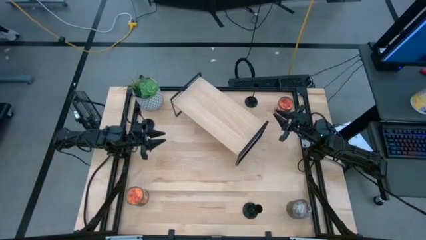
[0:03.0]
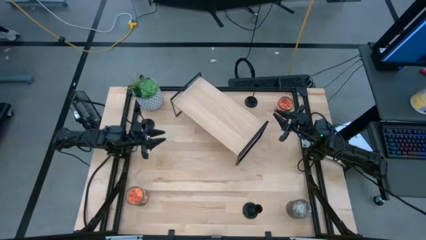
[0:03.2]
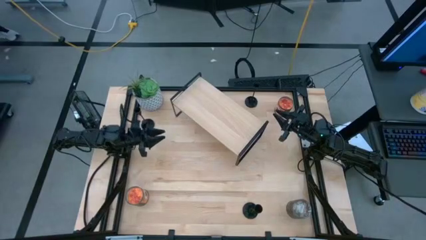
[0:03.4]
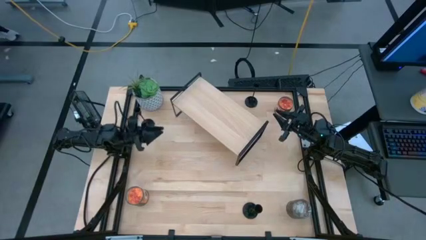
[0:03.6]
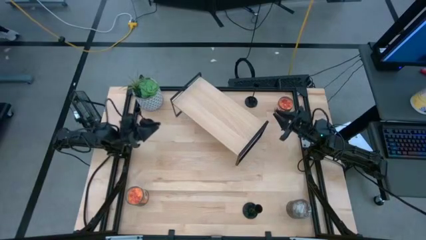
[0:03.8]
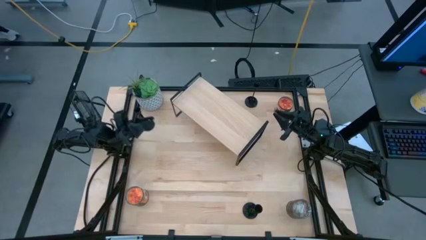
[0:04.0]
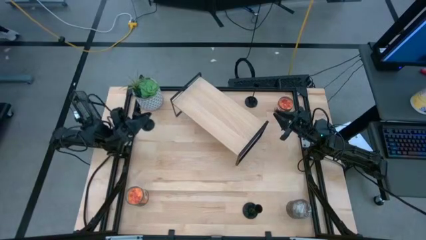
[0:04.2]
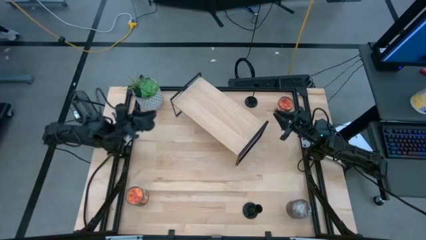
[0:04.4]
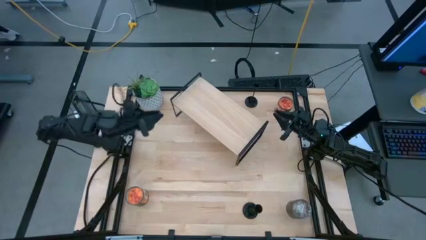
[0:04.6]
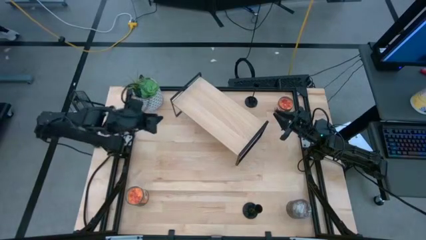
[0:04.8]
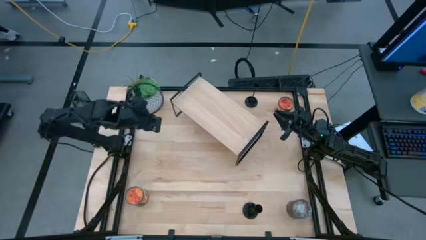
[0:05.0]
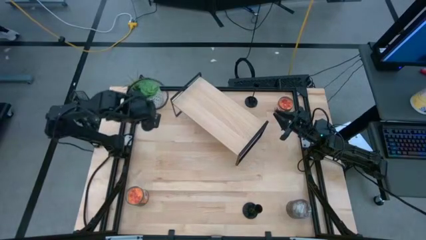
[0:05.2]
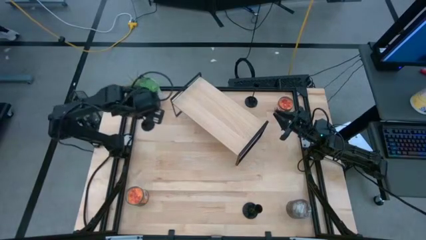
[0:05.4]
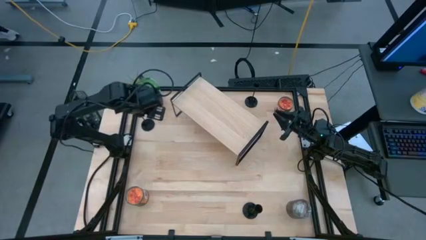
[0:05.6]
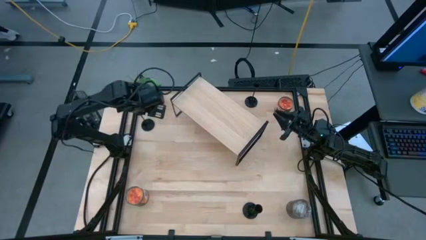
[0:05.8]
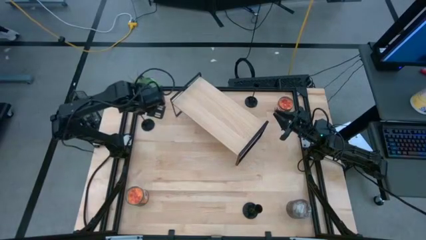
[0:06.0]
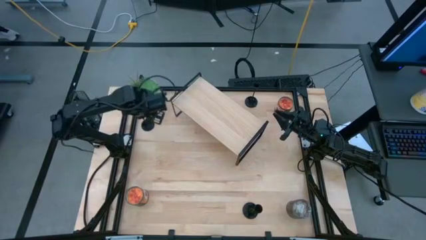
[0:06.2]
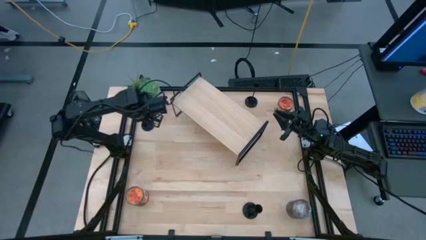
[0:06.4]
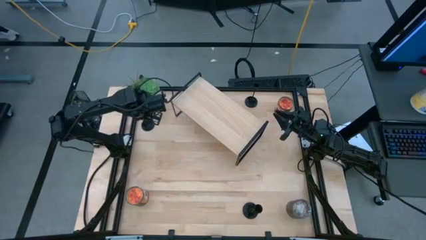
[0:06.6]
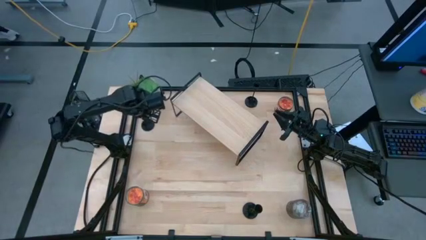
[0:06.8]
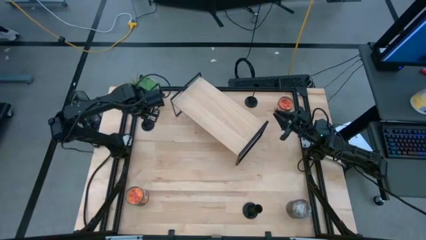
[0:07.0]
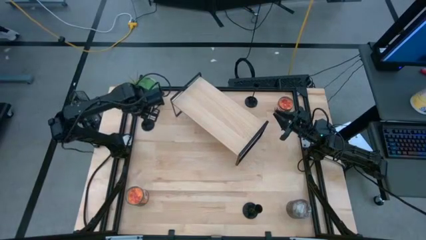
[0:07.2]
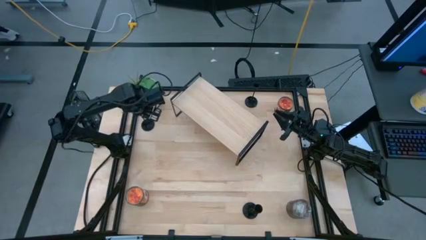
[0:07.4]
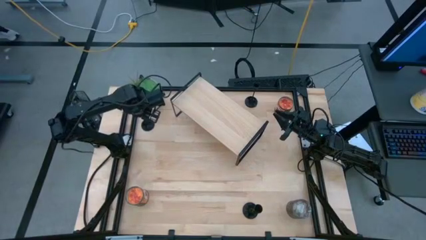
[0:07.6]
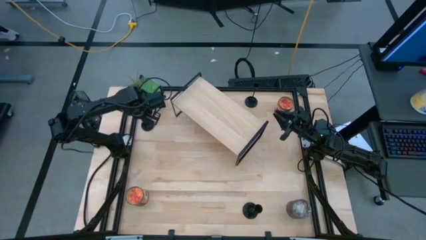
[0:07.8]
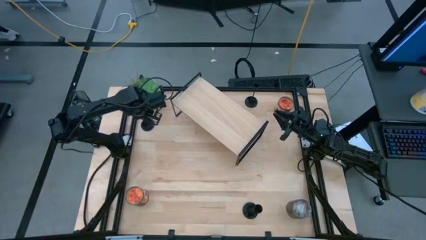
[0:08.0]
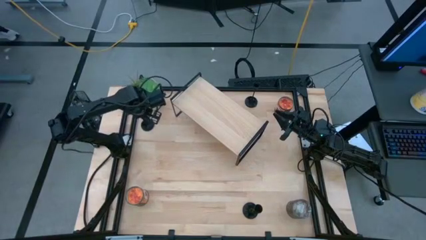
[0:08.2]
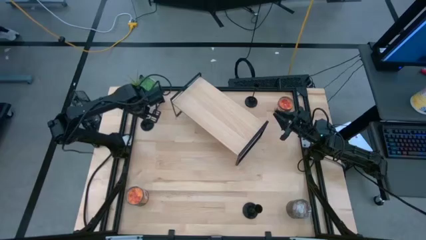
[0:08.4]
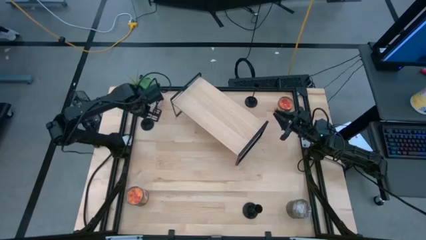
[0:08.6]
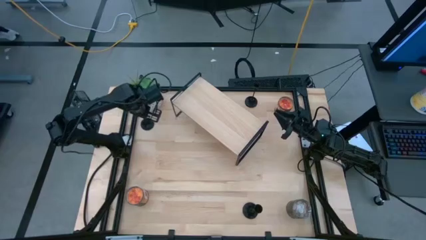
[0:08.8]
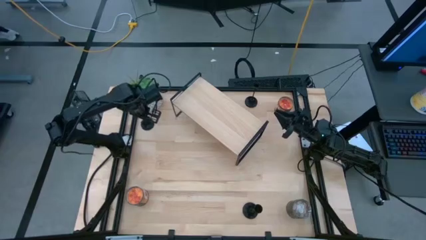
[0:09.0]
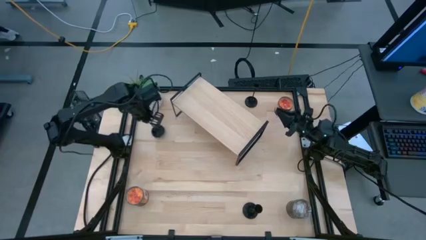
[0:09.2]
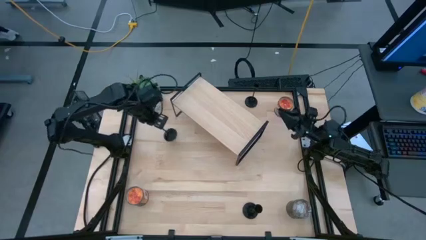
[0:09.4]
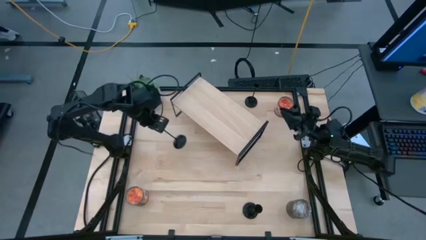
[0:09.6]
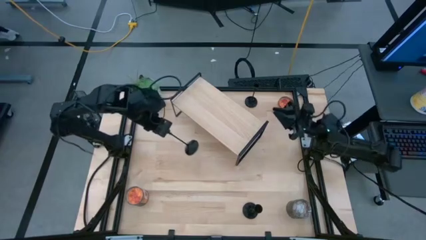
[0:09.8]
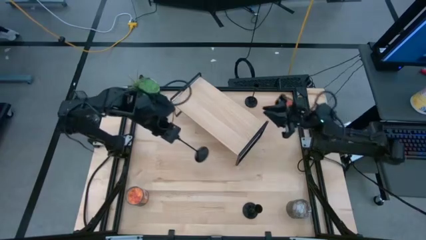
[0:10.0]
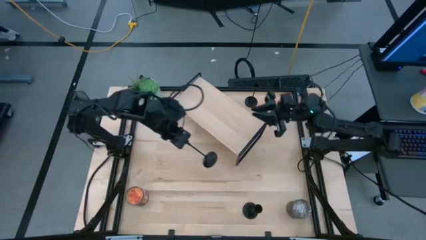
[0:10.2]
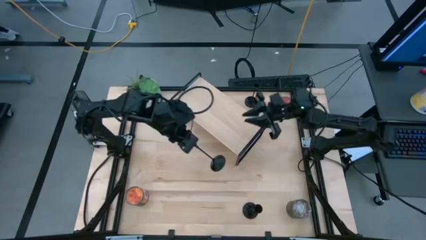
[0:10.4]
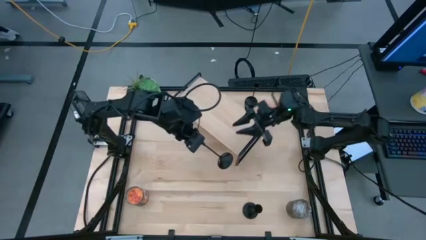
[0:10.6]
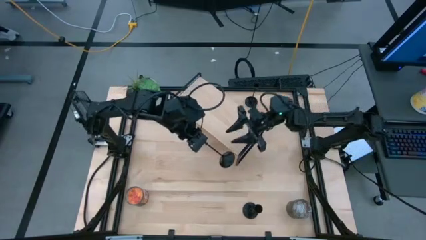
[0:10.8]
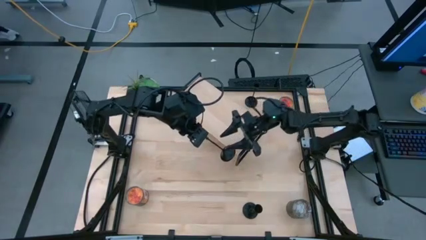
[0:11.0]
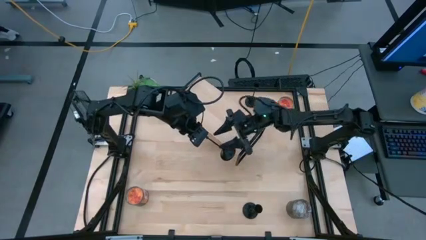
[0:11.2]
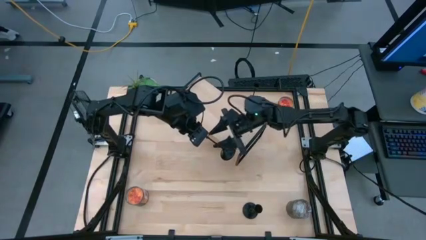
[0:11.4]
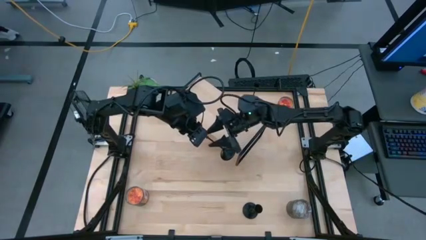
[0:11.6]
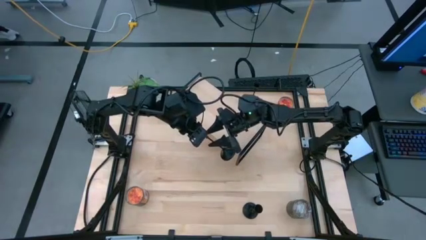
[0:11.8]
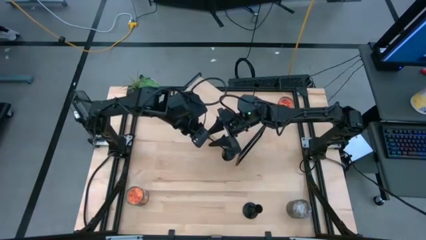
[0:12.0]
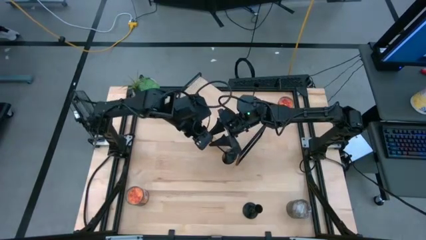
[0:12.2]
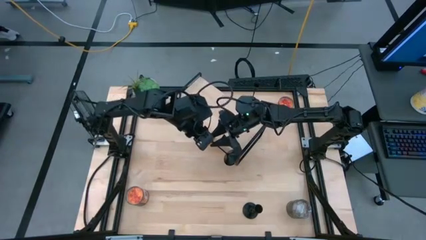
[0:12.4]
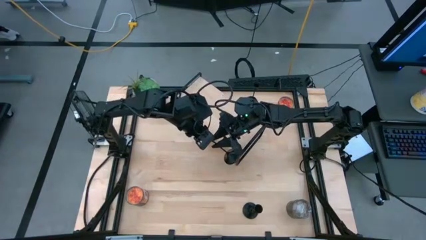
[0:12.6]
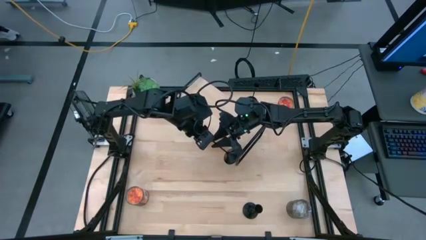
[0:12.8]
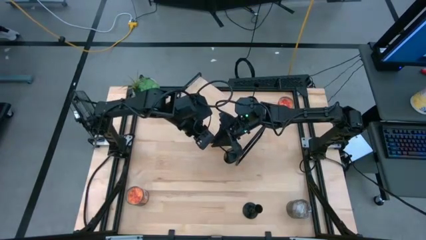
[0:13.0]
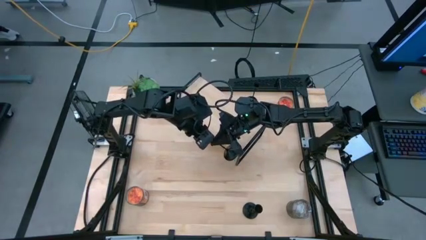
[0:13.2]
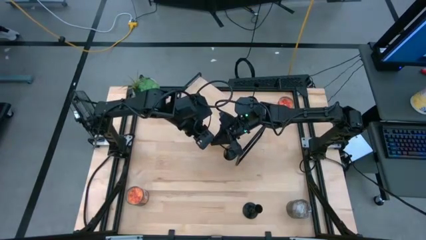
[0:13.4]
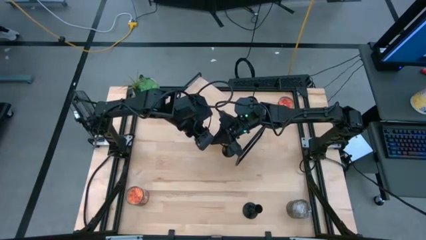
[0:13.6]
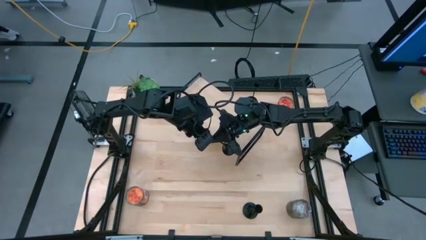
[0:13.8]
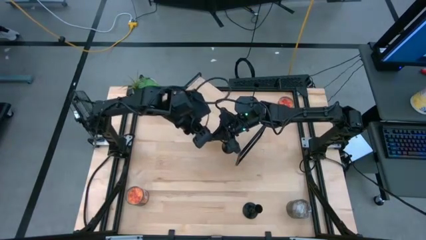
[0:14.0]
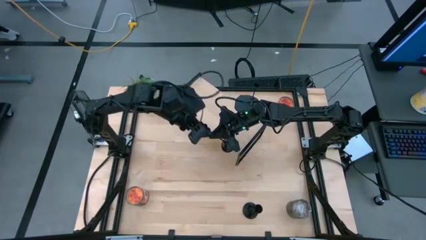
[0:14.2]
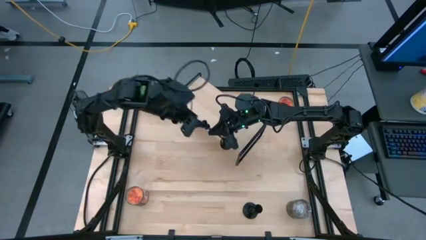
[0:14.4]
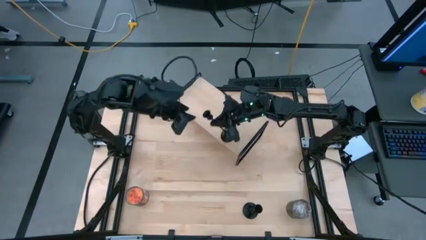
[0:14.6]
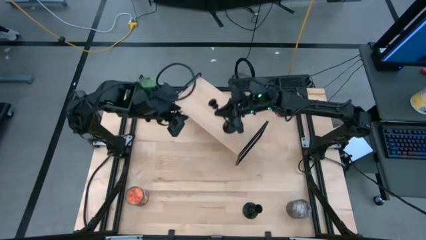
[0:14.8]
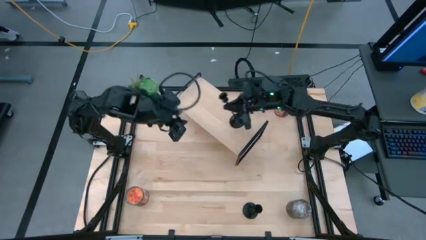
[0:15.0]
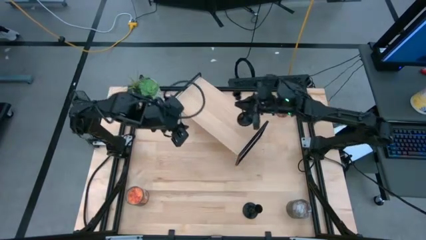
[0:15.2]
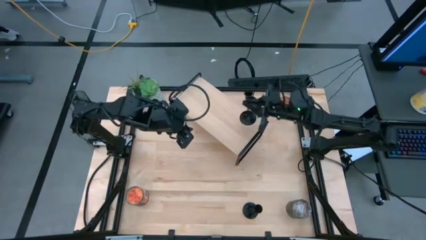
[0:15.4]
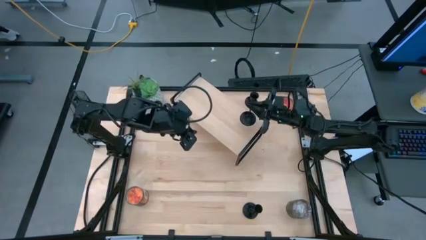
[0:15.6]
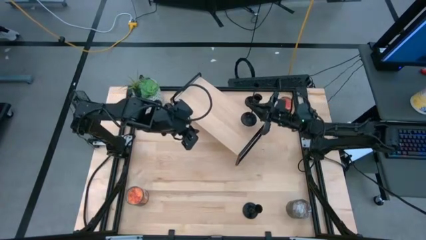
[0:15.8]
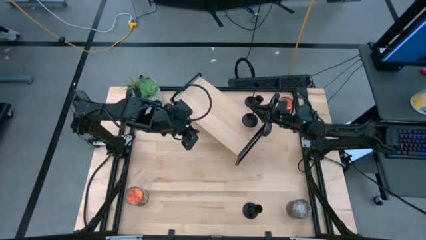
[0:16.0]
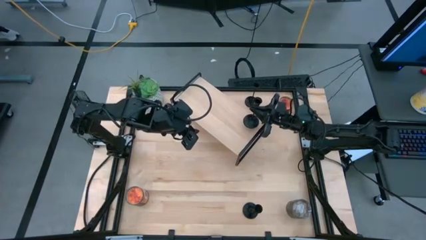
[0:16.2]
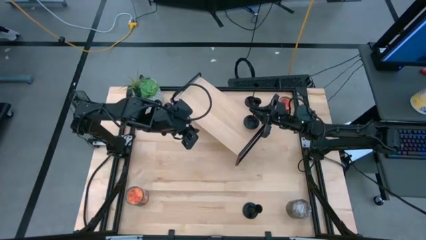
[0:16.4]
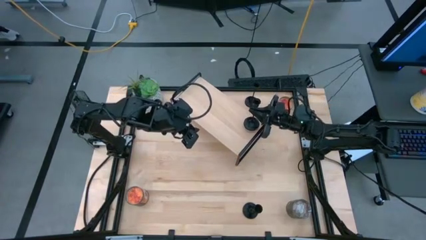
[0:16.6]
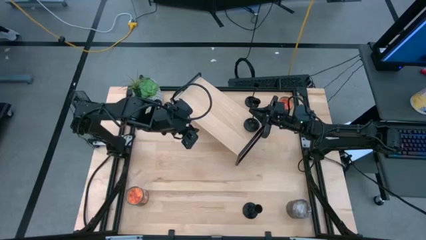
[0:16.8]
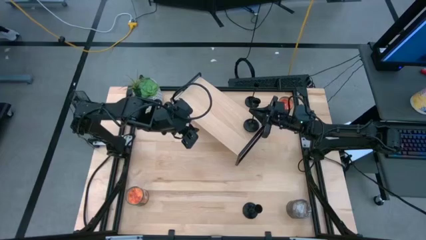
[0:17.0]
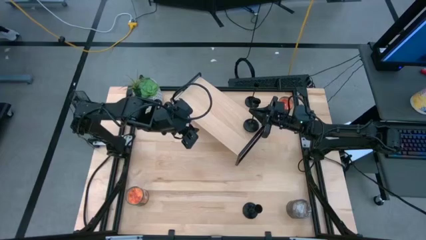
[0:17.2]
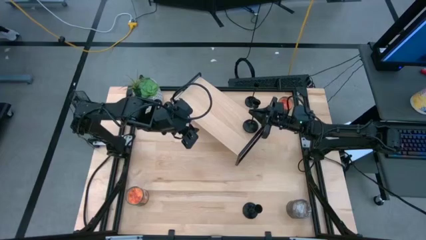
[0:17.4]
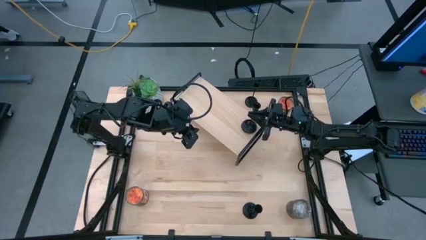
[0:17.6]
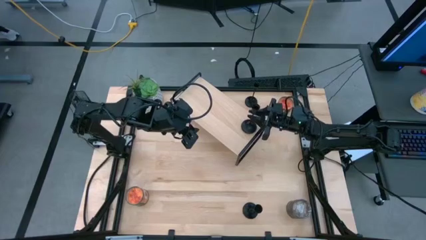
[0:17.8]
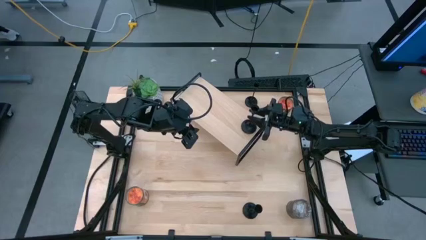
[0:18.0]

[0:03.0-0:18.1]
Task: Pick & Place candle stick holders
Put the top left black candlestick on the shelf
